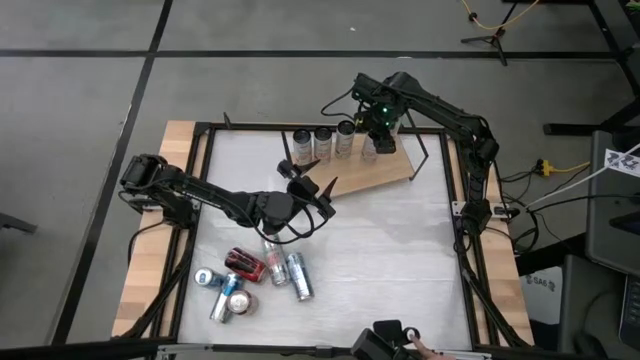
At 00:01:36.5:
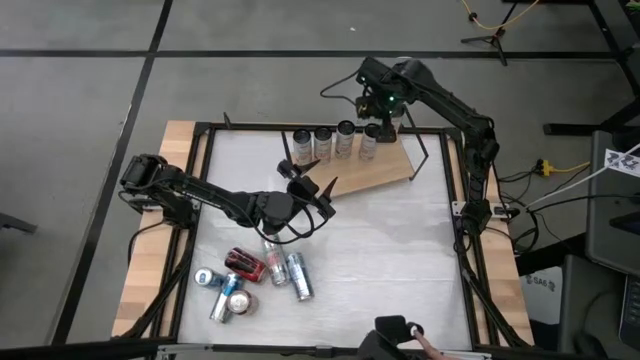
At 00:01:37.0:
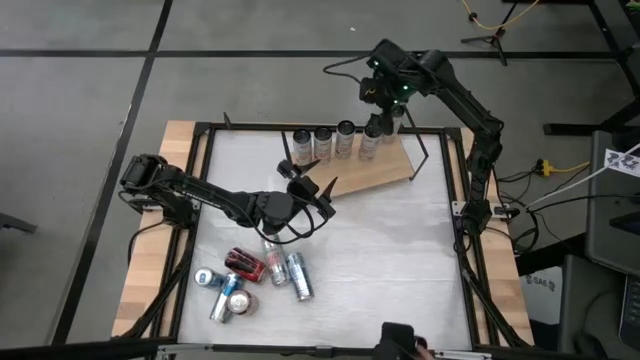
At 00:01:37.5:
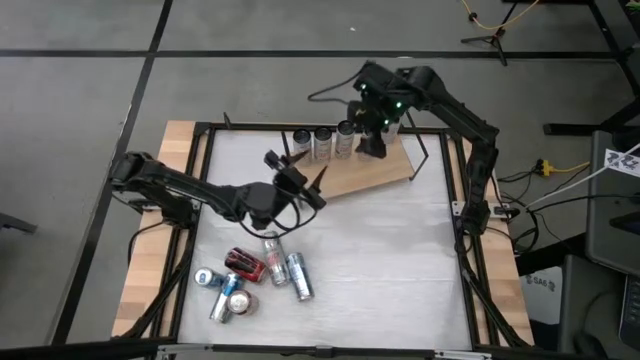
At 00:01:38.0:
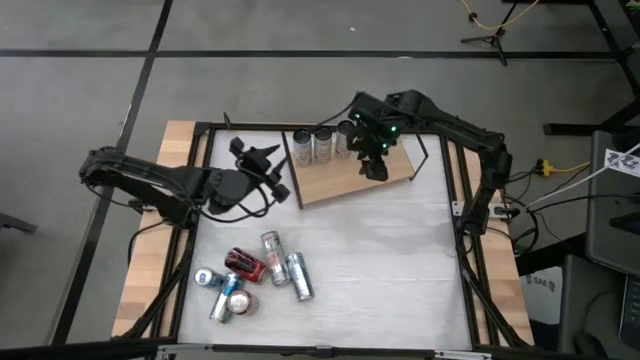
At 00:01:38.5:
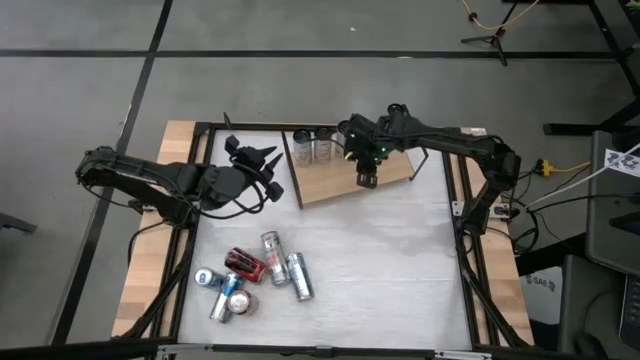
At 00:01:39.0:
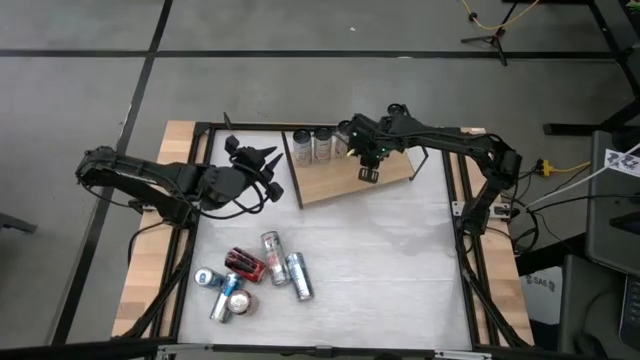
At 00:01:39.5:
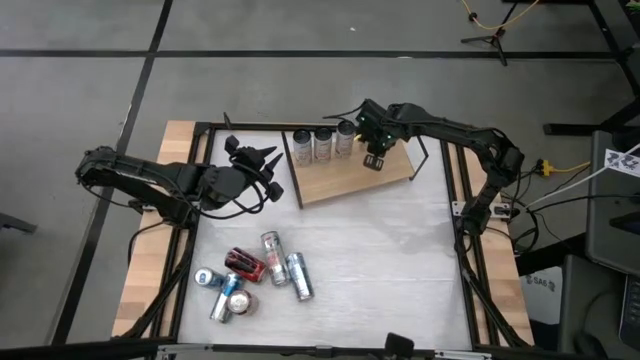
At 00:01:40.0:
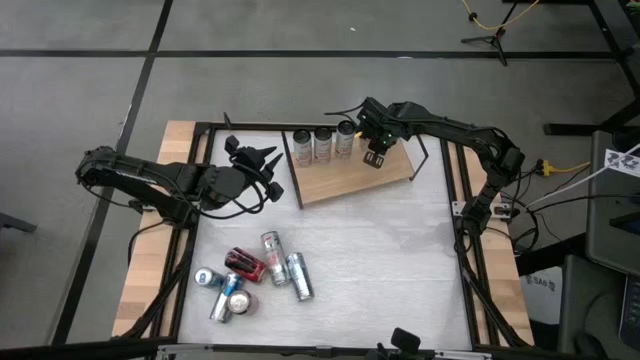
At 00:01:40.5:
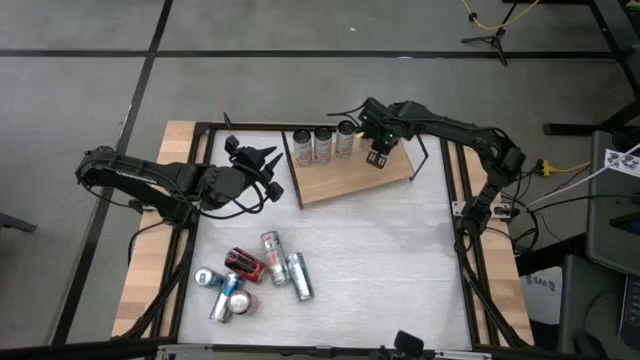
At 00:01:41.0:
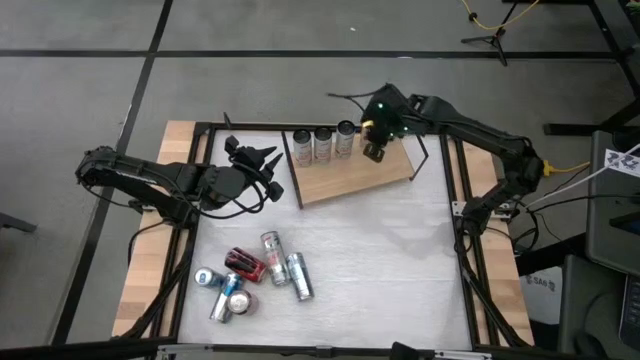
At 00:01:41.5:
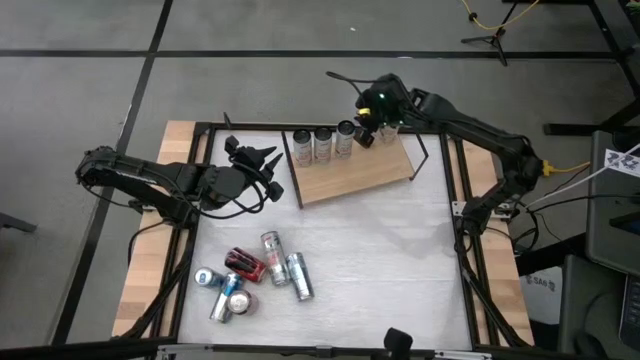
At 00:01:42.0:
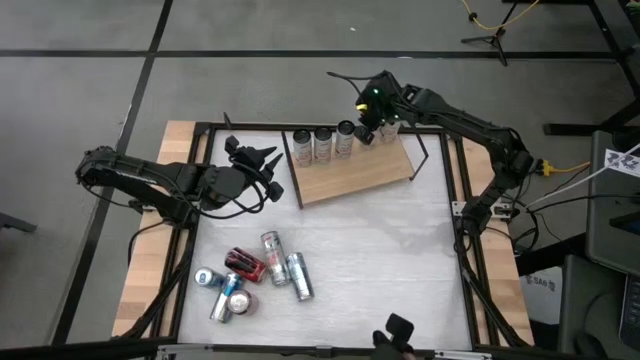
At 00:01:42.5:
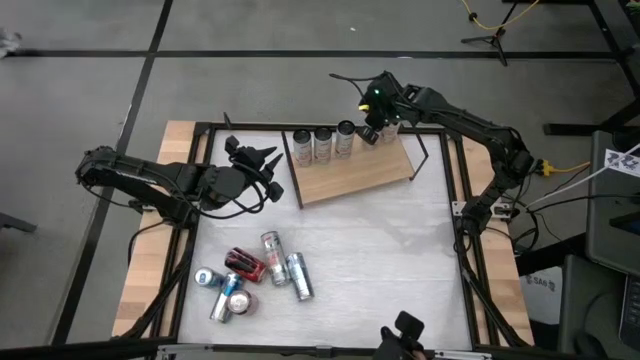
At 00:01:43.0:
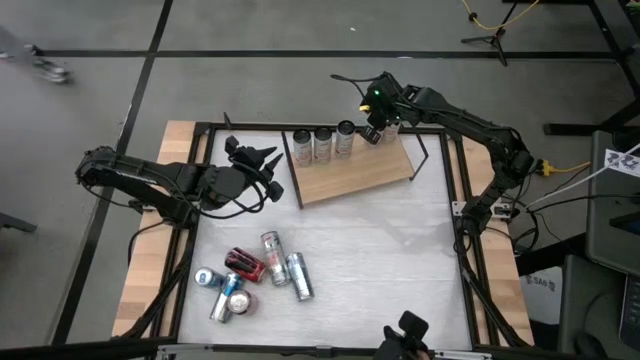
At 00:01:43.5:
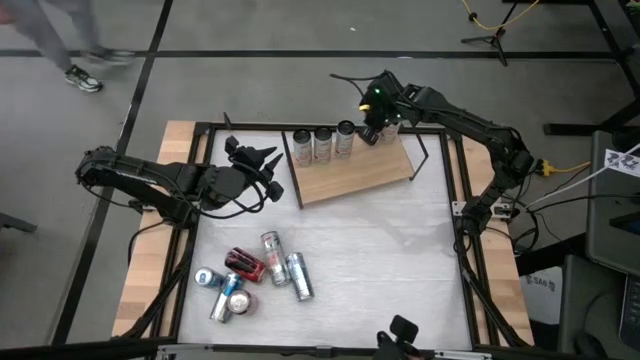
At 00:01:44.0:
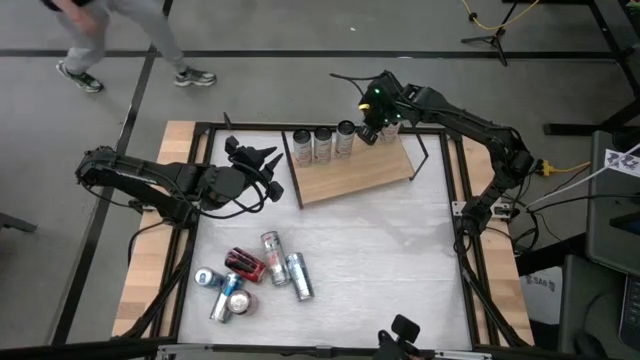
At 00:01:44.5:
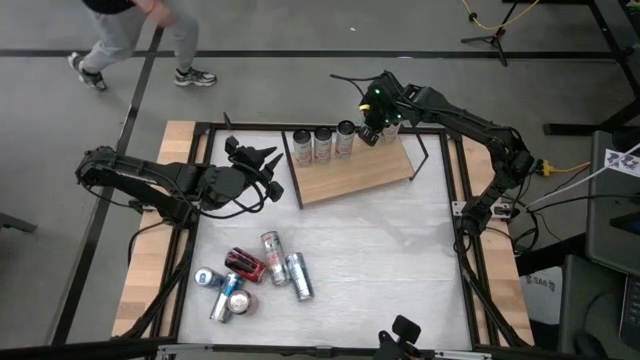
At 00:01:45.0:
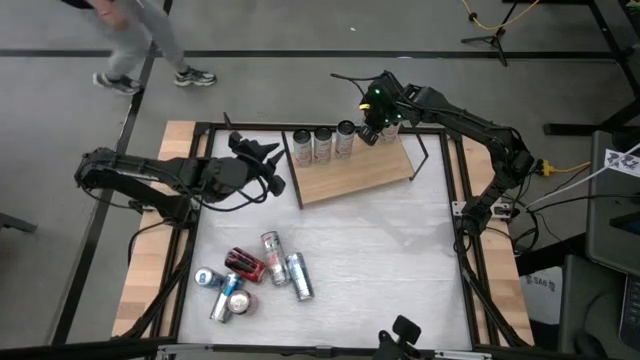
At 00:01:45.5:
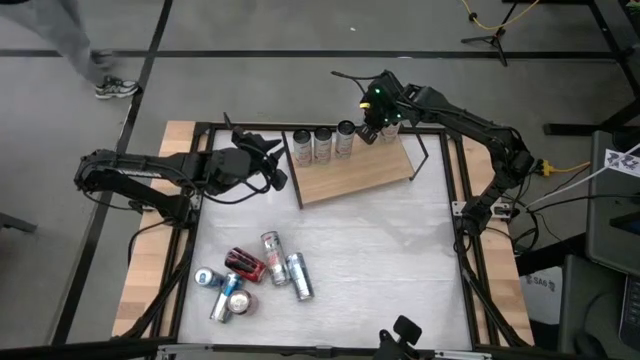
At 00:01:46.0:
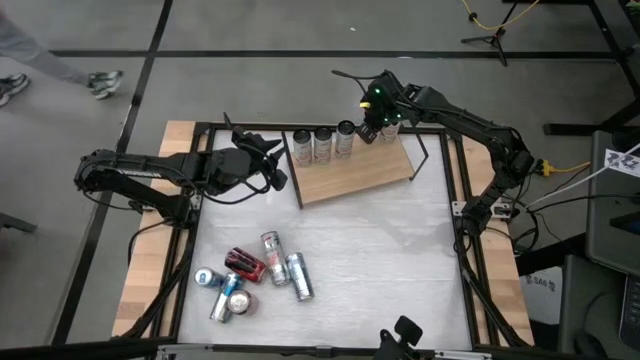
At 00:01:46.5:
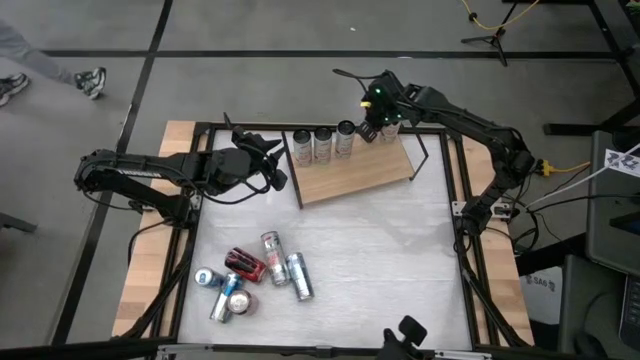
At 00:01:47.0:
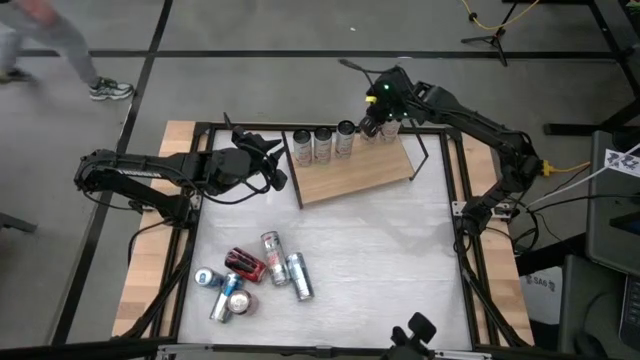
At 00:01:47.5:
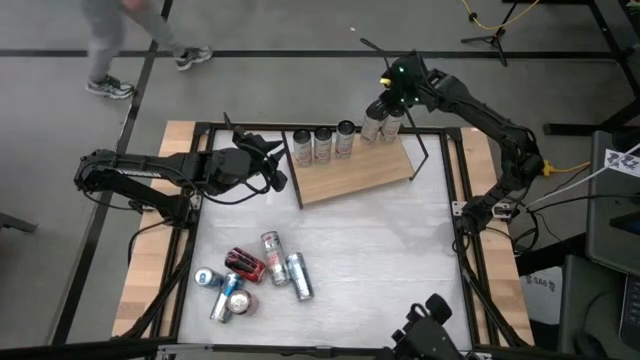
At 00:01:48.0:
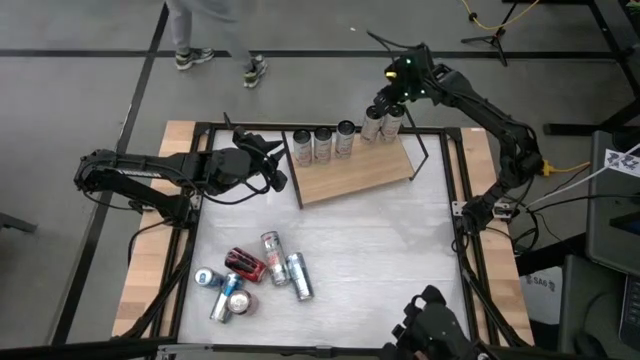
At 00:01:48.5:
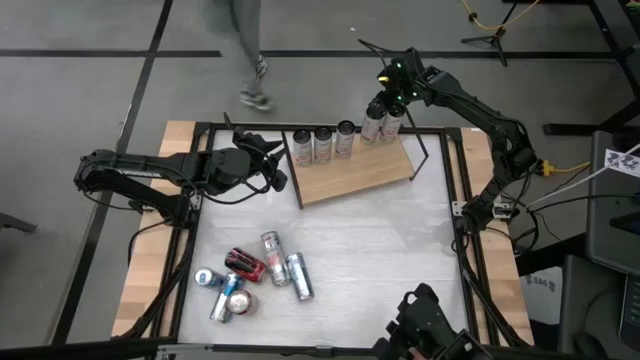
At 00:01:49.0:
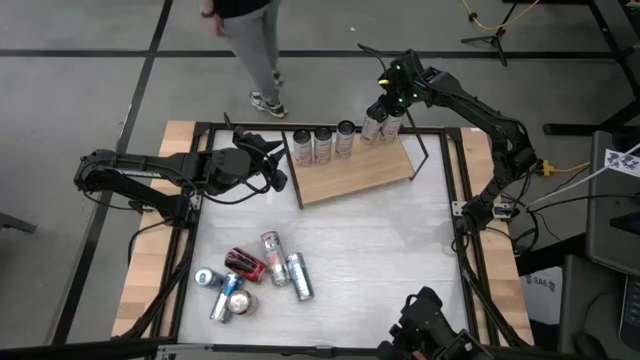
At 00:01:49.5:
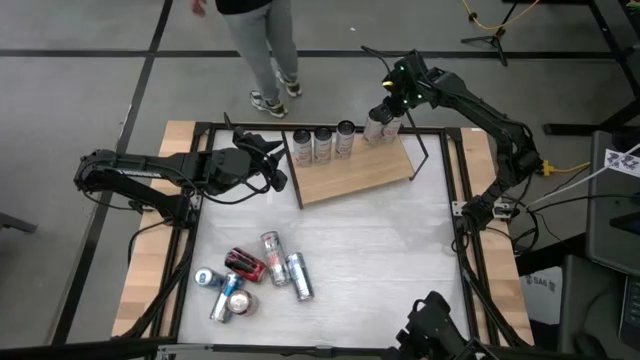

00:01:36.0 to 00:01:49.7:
Task: Place canned beverage on shelf
Put the white pink soda can on the shelf aligned with the other white pink soda cans

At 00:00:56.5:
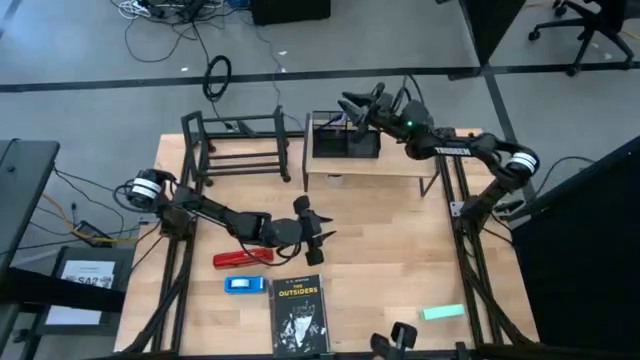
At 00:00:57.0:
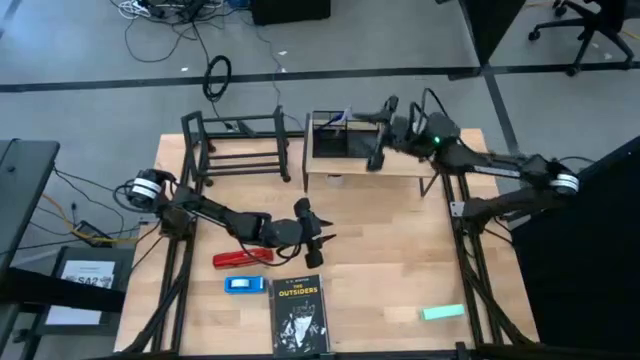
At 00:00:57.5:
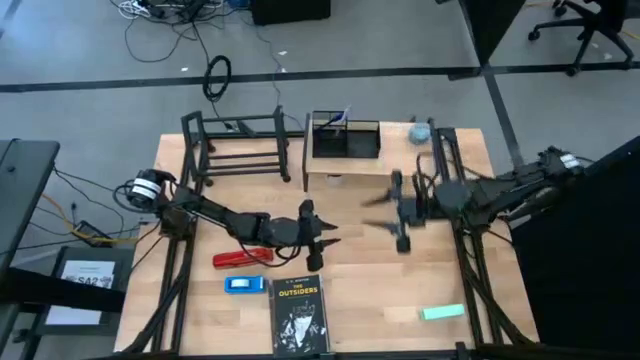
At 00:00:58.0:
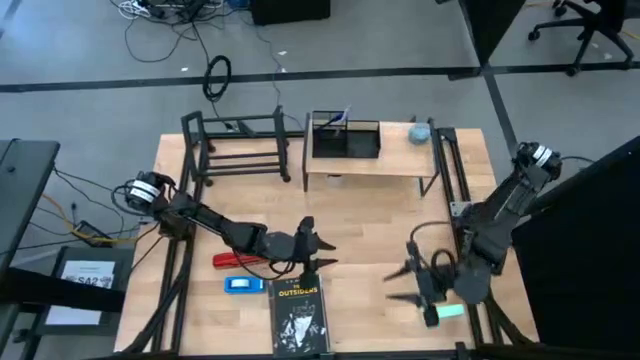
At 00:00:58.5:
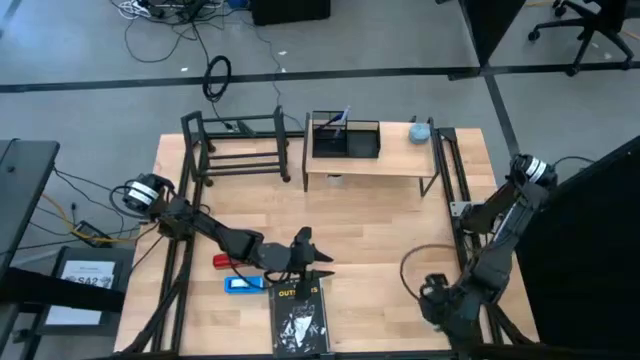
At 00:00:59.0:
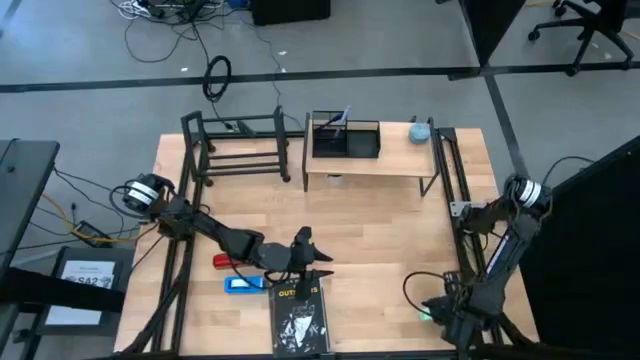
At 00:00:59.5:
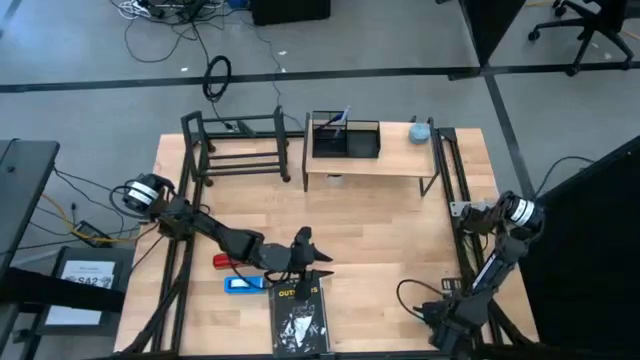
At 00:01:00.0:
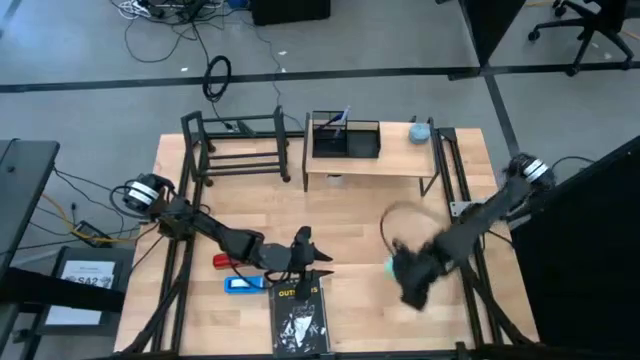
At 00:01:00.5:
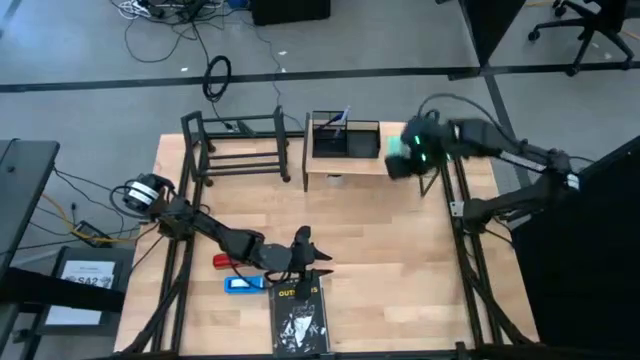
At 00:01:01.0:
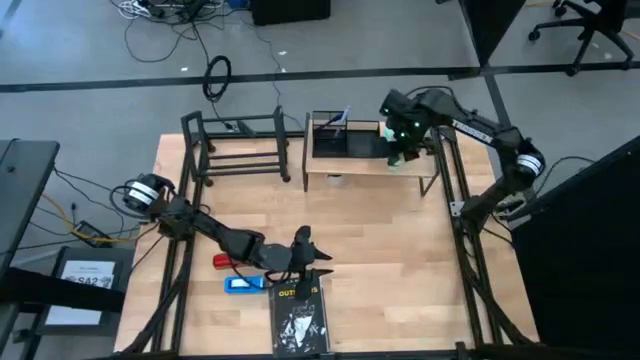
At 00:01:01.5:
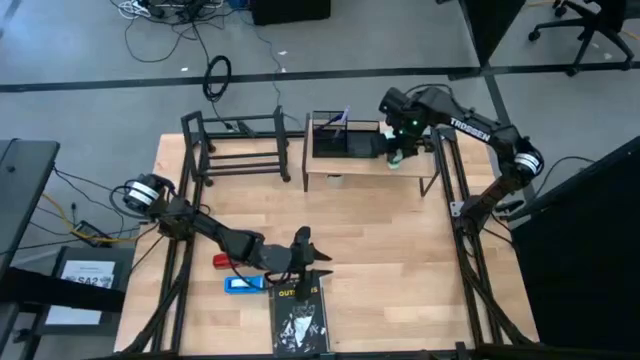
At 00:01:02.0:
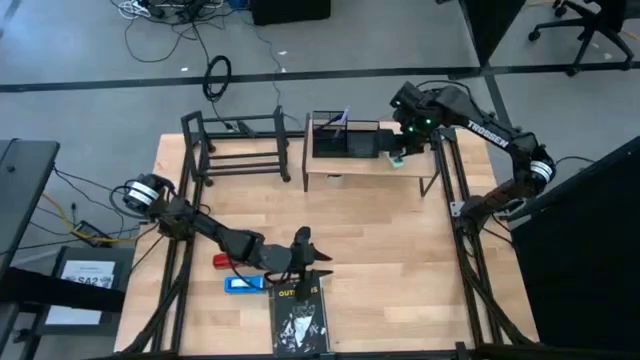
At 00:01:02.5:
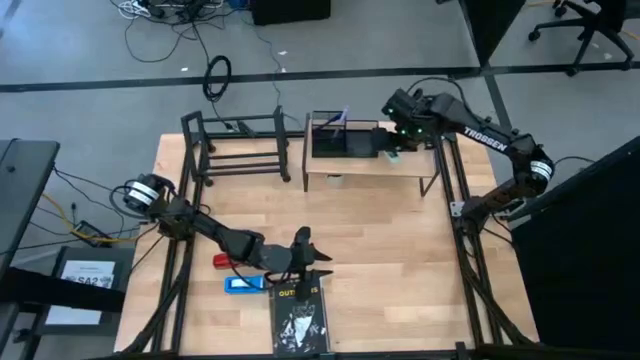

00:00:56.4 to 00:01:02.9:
Task: Stock shelves
Put the blue stapler on the shelf

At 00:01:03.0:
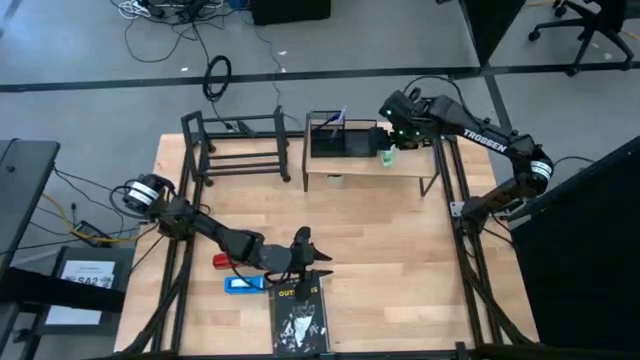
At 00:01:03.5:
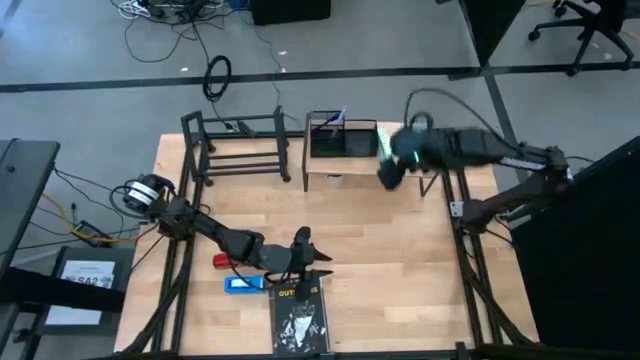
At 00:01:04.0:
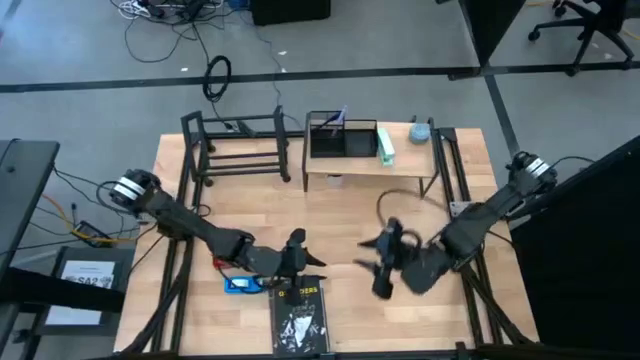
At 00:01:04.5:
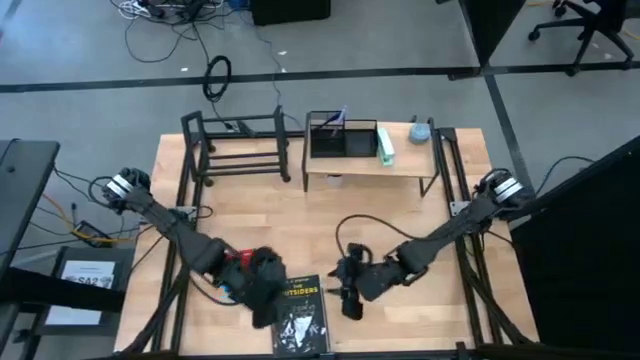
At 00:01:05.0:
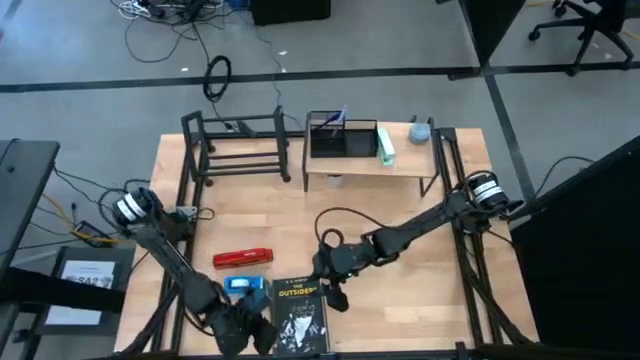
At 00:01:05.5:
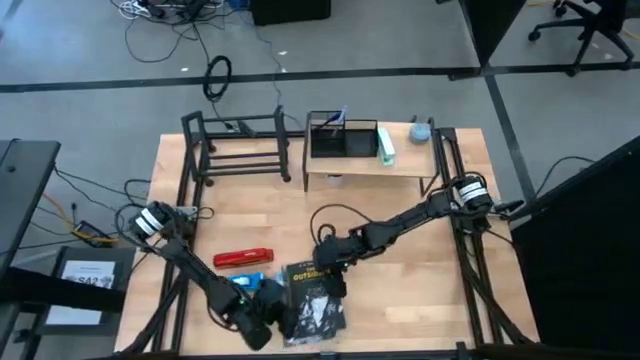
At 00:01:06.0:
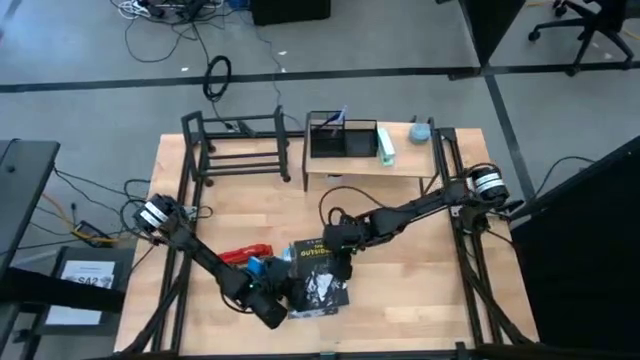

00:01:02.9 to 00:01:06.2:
Adjust the stacked books
